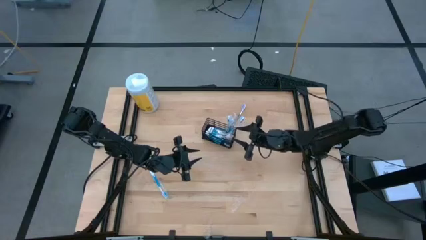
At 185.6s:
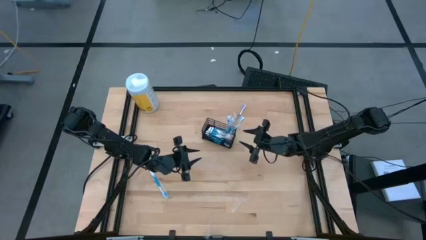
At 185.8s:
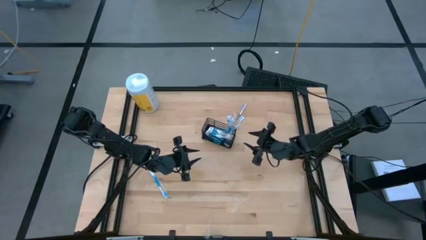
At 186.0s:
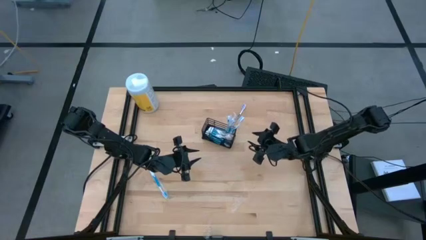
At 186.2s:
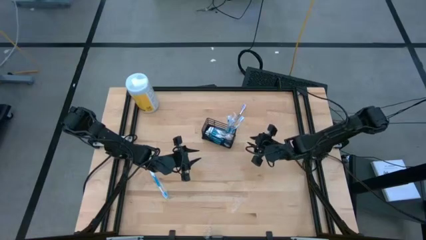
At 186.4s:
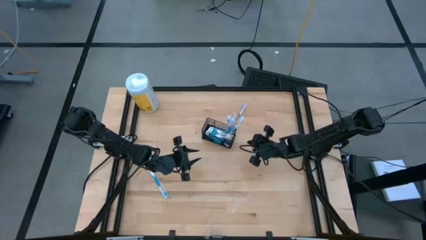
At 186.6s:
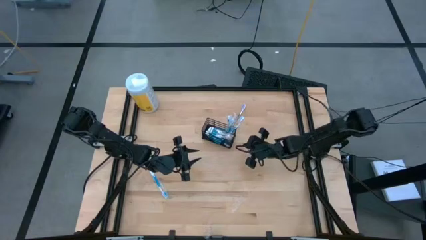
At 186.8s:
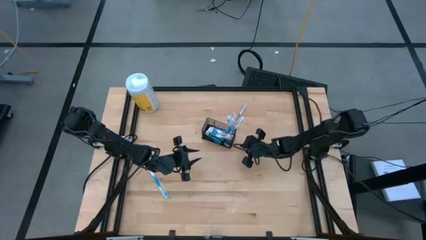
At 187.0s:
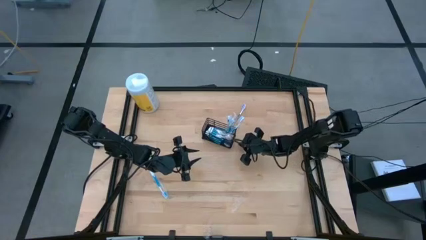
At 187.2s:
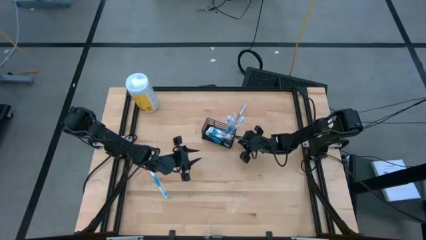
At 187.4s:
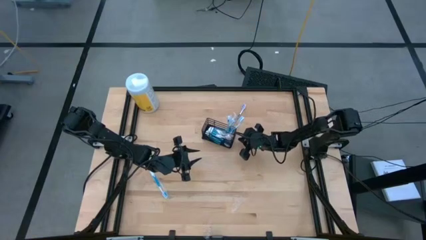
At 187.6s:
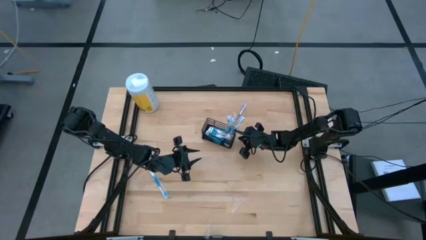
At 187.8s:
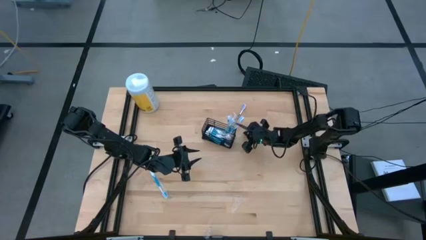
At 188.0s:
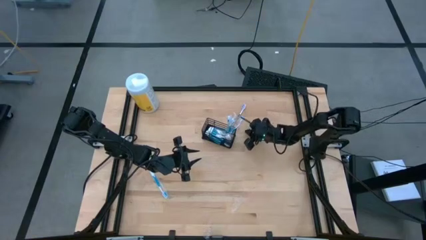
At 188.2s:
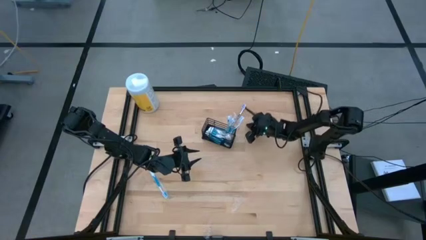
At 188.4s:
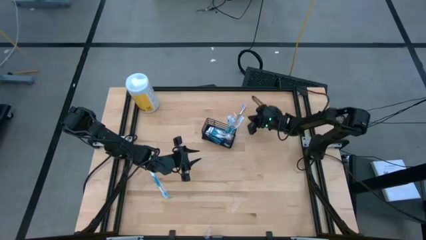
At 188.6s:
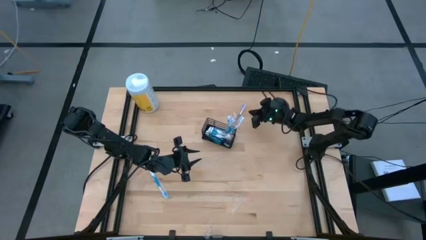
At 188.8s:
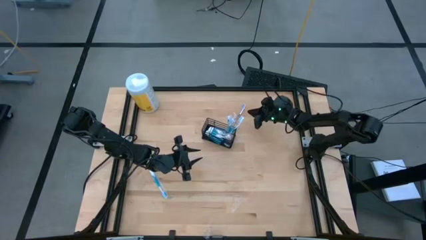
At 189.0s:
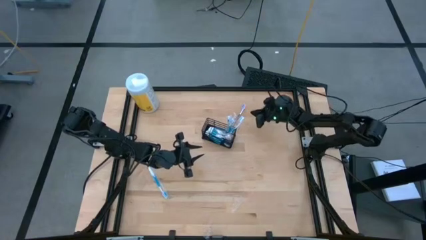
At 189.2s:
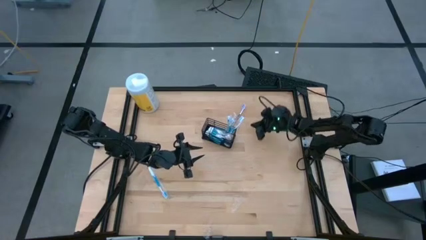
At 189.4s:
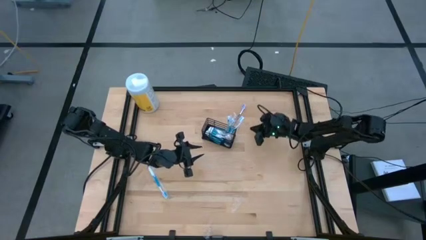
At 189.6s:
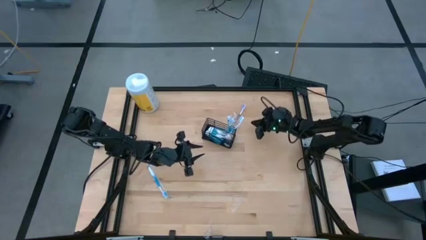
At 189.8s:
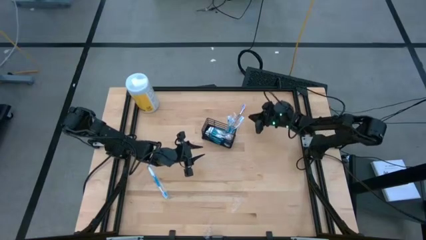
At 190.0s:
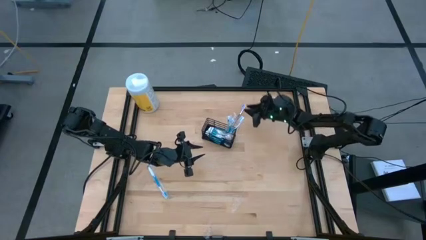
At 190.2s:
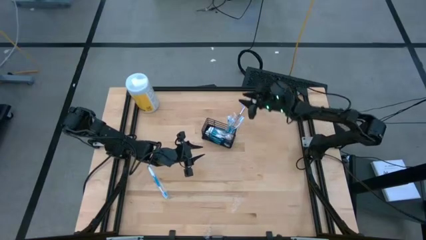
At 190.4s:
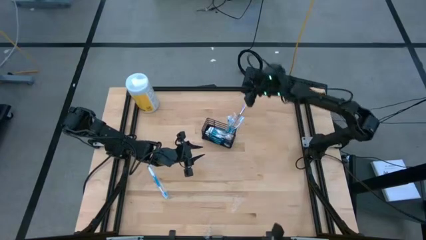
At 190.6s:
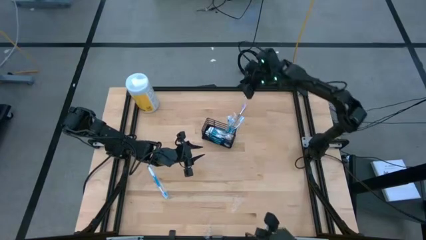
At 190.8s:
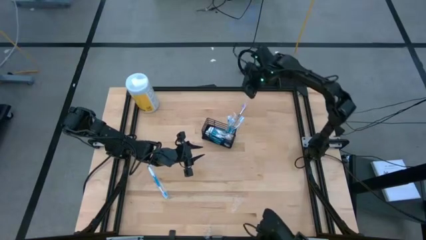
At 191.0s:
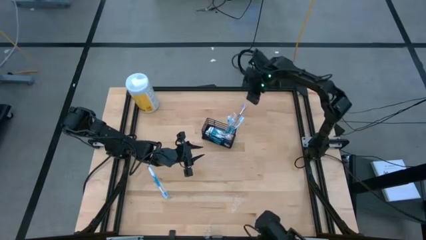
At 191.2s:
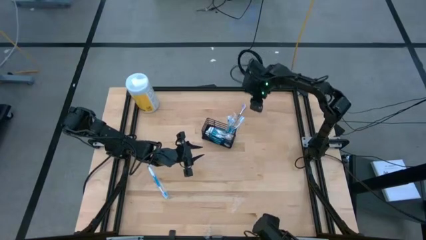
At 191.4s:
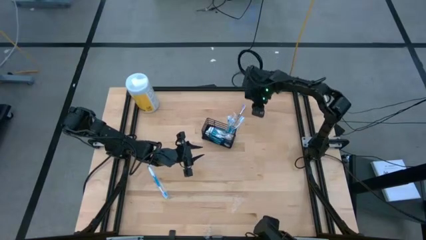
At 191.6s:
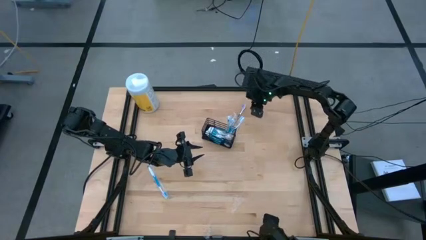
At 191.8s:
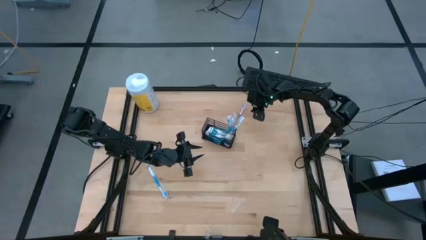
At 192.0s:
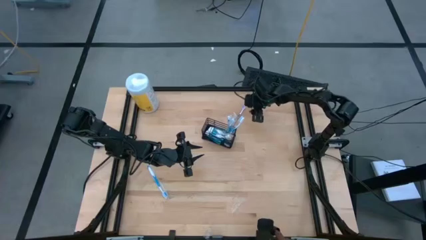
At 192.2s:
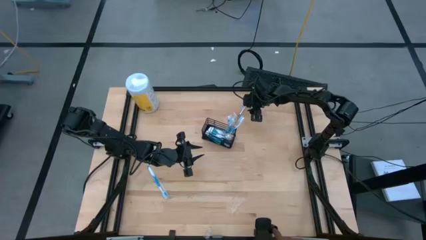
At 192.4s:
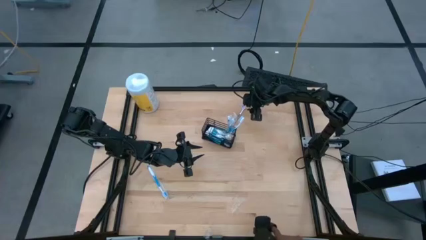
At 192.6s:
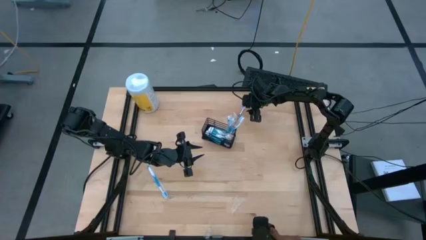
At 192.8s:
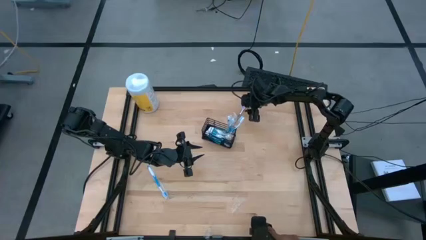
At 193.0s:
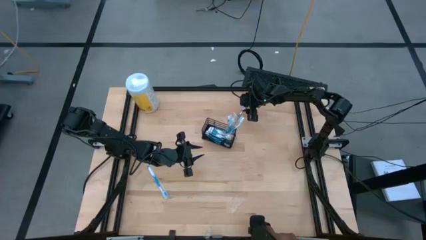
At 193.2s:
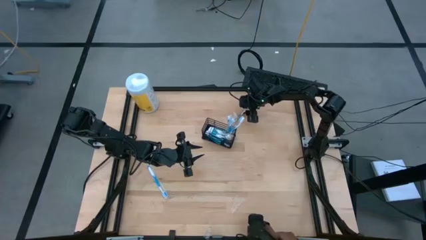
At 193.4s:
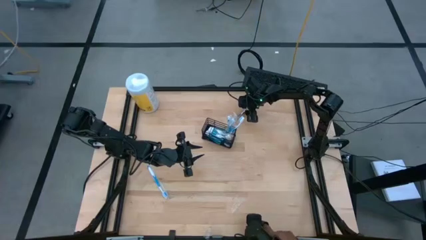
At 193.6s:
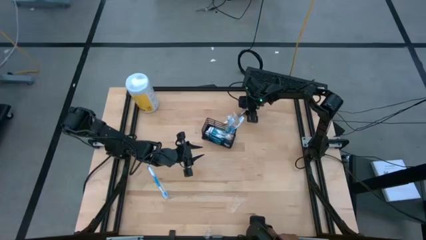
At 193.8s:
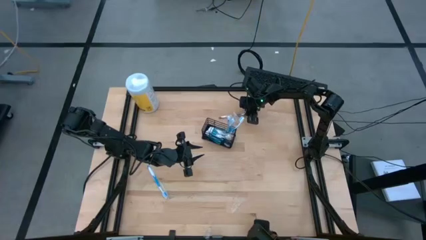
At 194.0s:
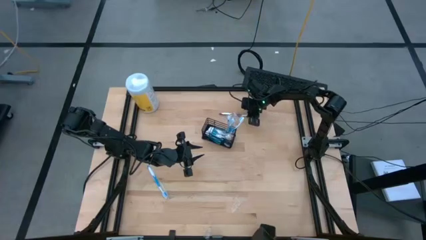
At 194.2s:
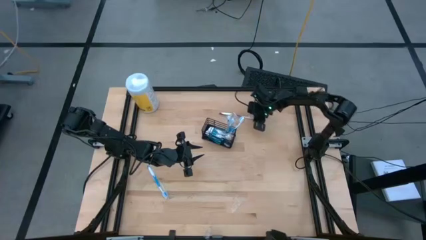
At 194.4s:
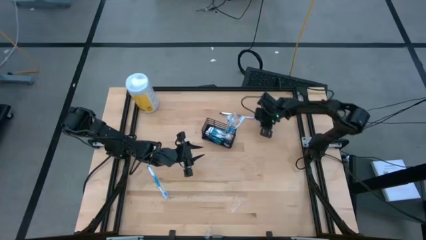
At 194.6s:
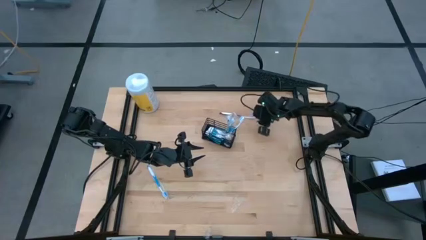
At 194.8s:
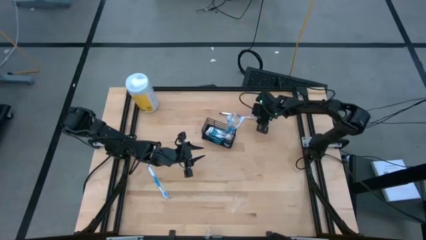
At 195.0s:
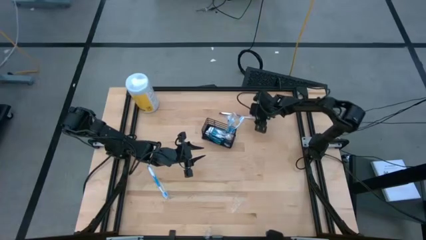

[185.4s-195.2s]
Task: Pick & Place toothbrushing station
Put the purple toothbrush into the wire organizer

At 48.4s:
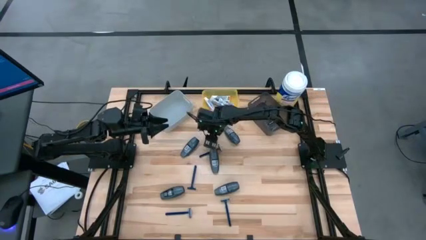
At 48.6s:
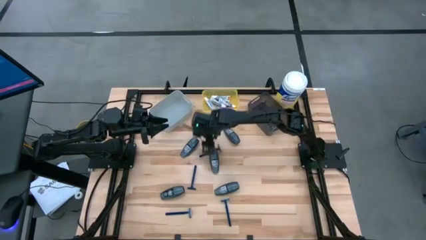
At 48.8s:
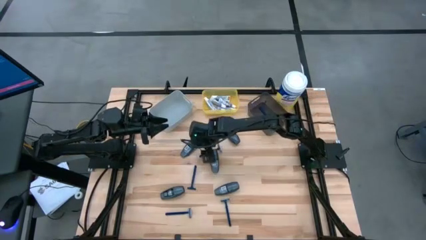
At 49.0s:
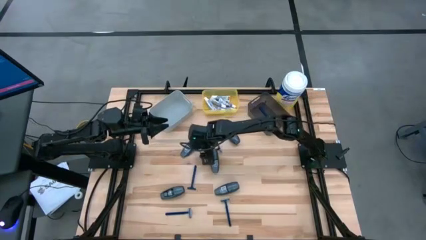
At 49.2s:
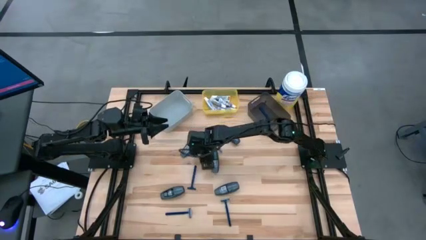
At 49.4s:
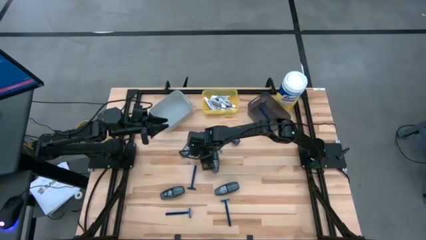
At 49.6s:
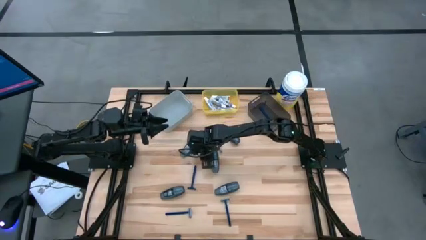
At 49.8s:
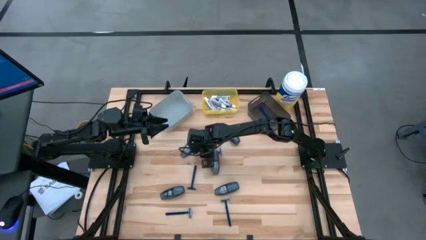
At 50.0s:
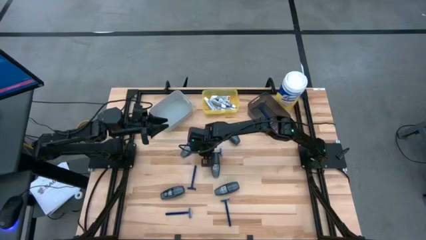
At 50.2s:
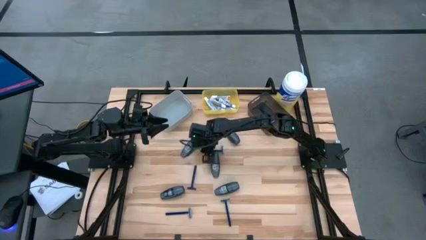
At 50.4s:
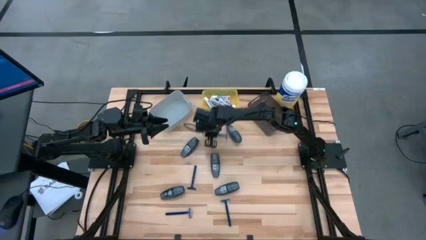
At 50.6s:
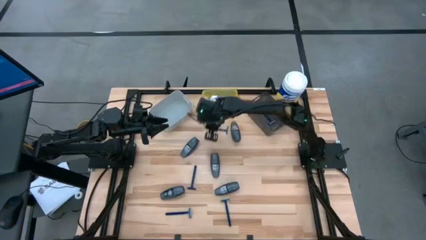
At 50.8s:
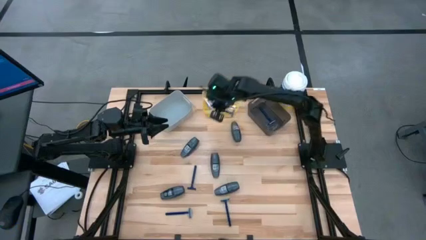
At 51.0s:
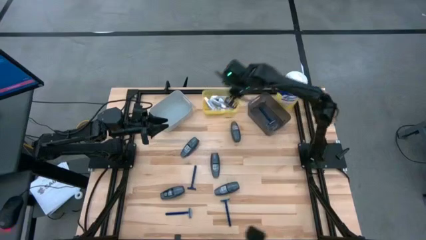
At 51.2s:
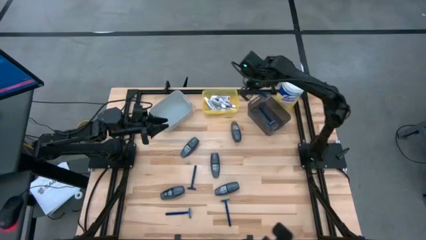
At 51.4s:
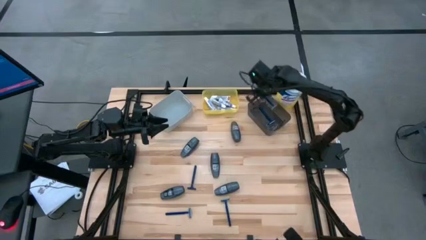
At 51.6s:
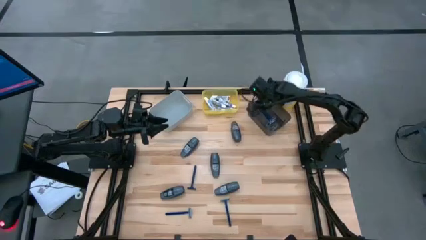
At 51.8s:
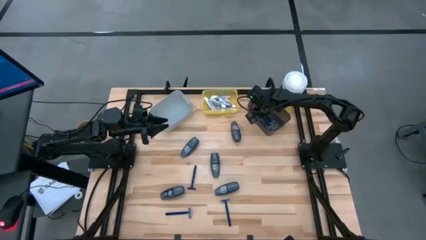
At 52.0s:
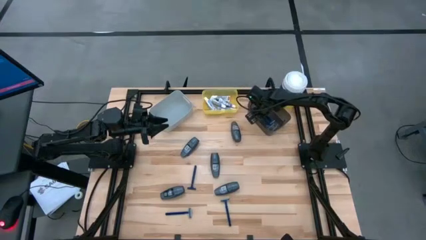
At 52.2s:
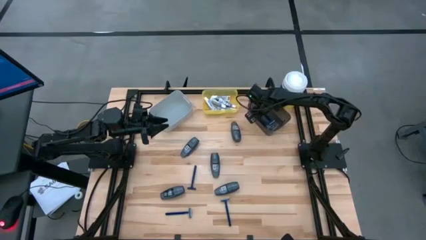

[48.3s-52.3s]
Task: Pick & Place Travel size toiletries
Put the blue razor into the black bin

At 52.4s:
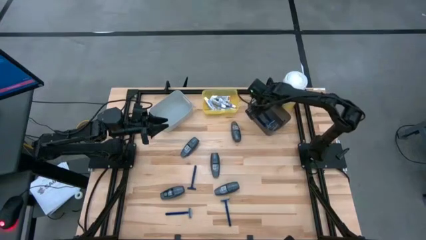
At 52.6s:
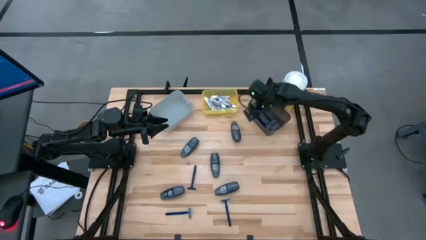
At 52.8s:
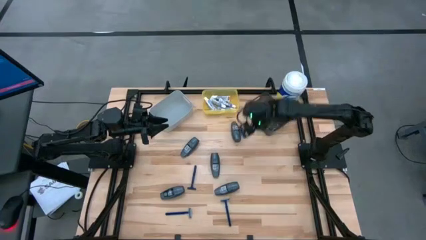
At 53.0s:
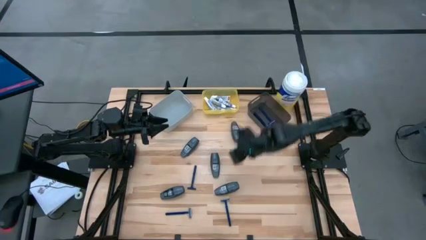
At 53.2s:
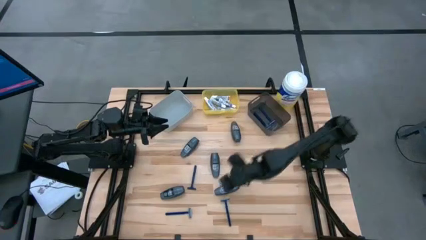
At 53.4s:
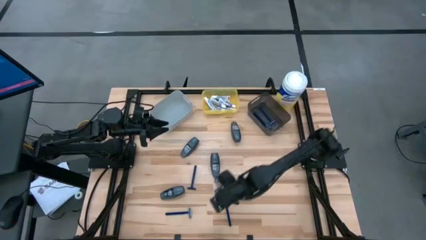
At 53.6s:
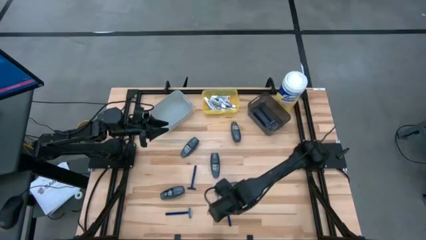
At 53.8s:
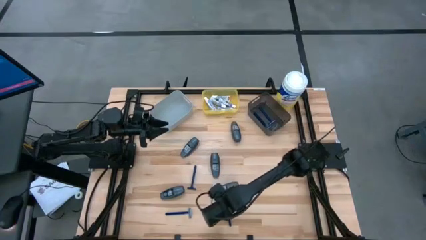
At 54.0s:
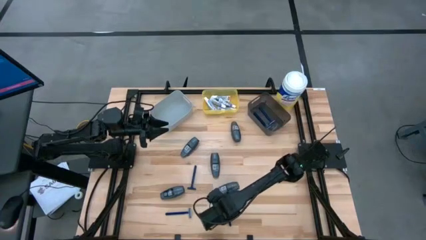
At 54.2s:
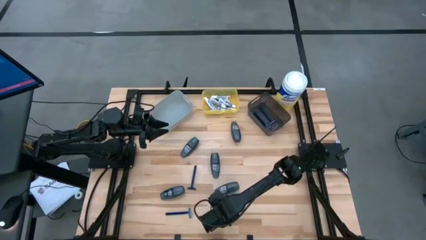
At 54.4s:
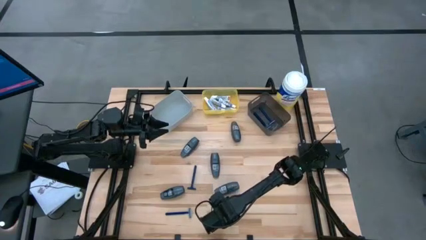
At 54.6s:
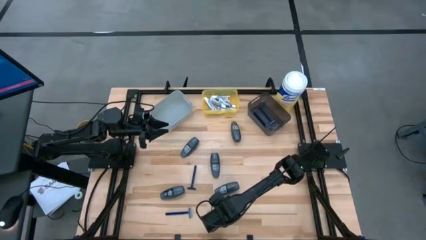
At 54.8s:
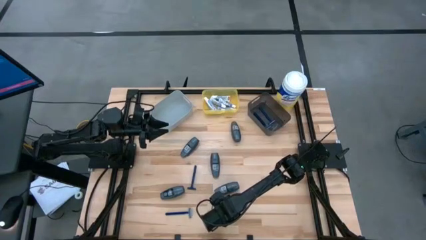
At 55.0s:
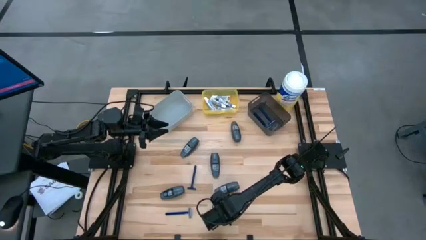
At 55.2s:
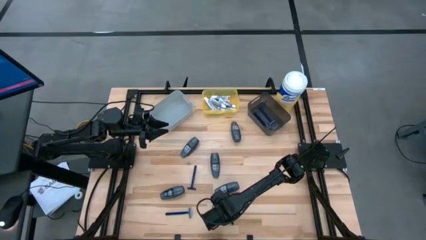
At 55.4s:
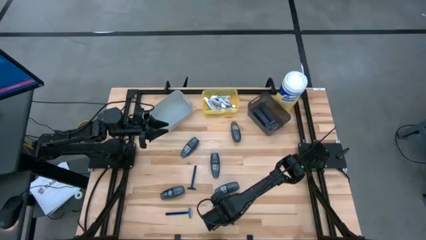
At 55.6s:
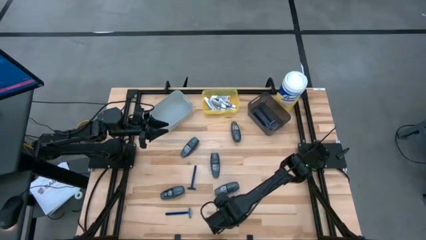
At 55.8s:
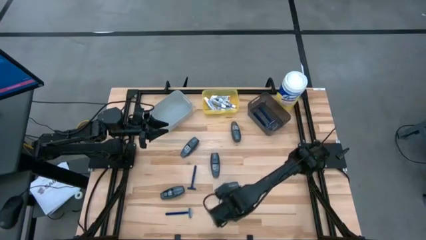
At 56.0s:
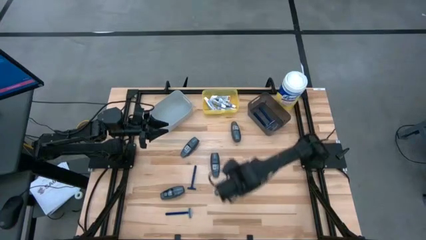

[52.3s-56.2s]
Put the blue razor into the black bin
